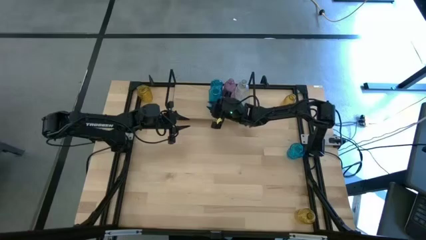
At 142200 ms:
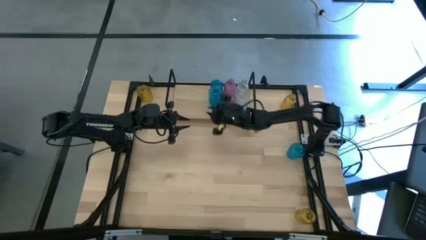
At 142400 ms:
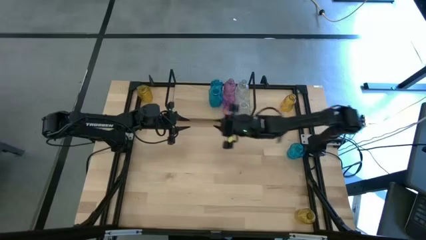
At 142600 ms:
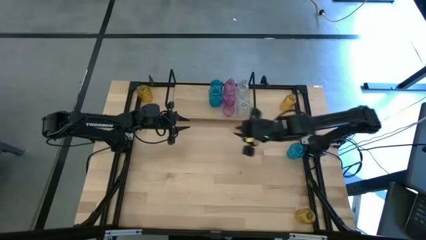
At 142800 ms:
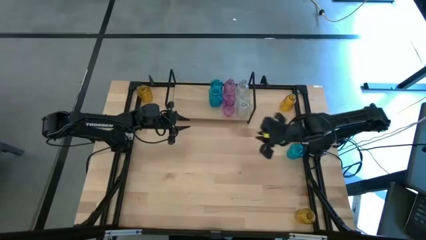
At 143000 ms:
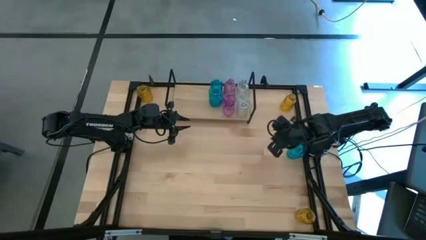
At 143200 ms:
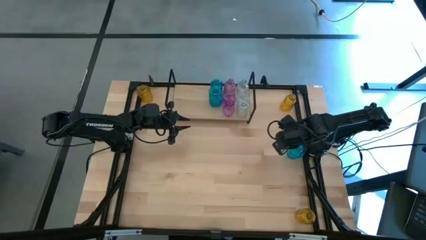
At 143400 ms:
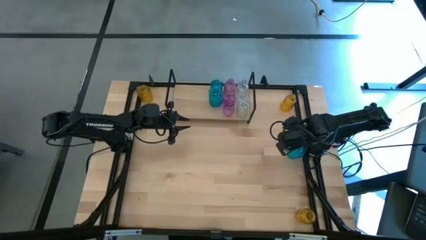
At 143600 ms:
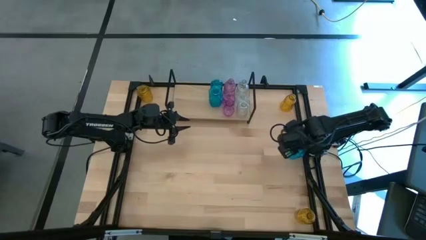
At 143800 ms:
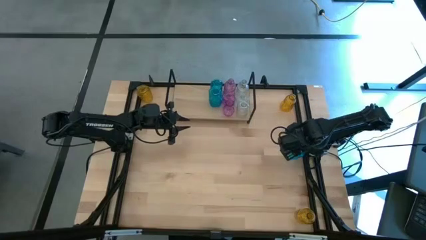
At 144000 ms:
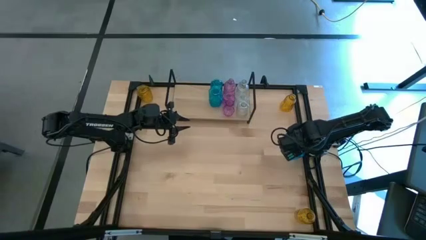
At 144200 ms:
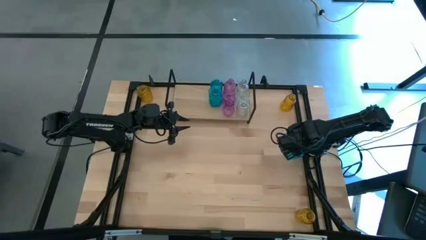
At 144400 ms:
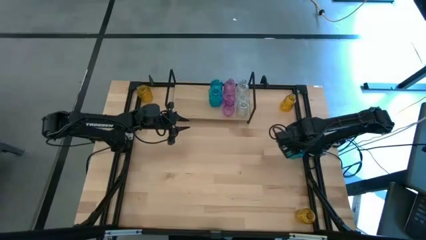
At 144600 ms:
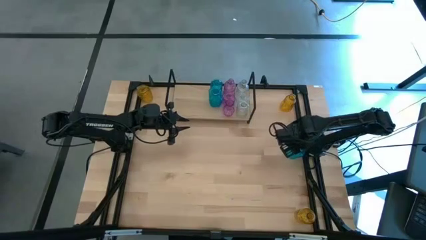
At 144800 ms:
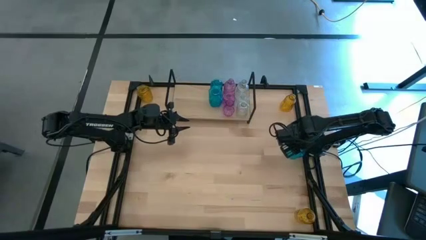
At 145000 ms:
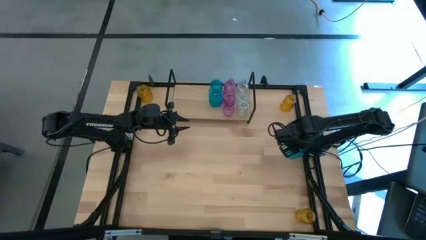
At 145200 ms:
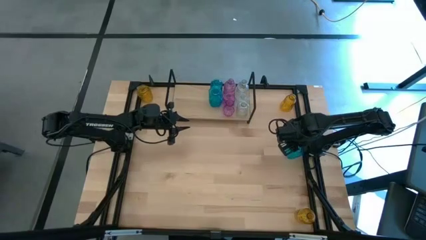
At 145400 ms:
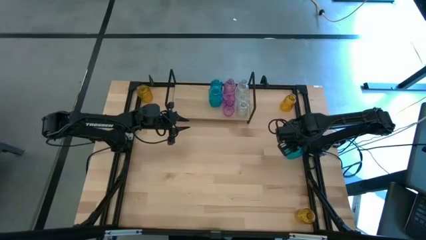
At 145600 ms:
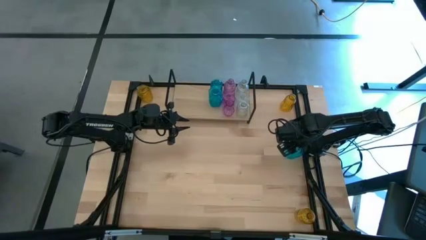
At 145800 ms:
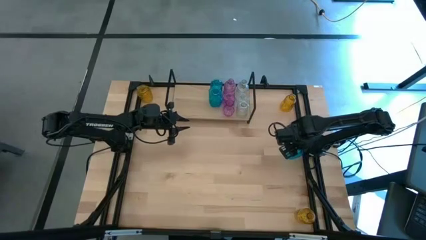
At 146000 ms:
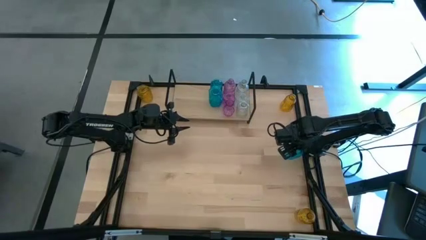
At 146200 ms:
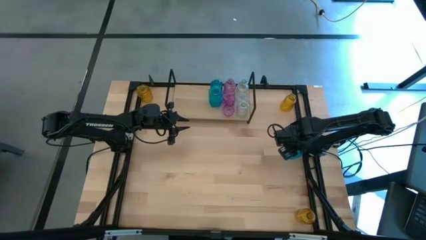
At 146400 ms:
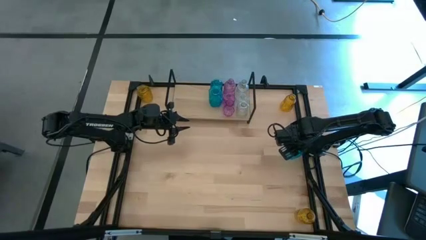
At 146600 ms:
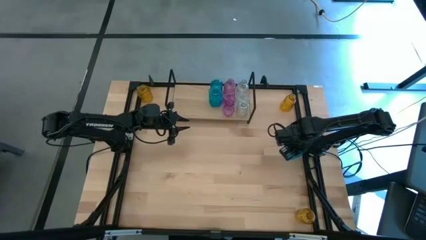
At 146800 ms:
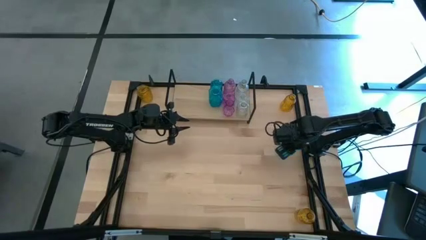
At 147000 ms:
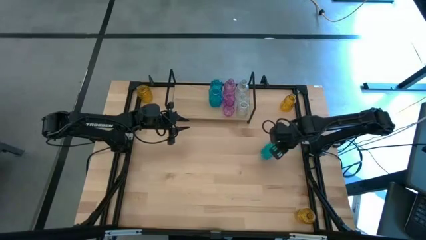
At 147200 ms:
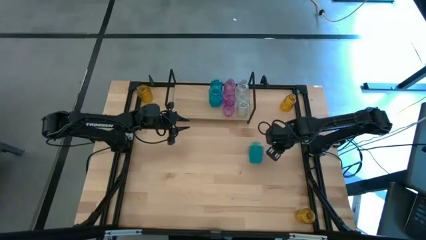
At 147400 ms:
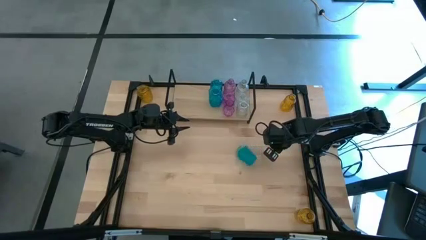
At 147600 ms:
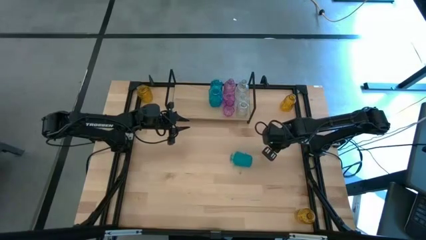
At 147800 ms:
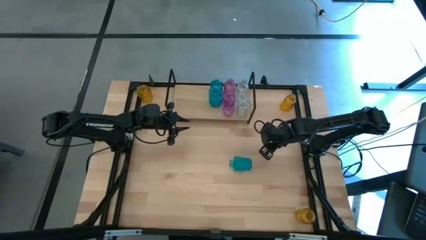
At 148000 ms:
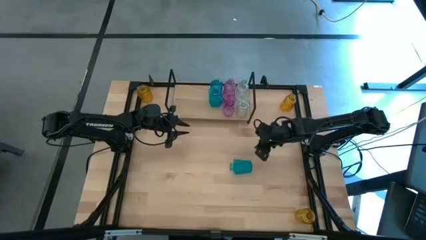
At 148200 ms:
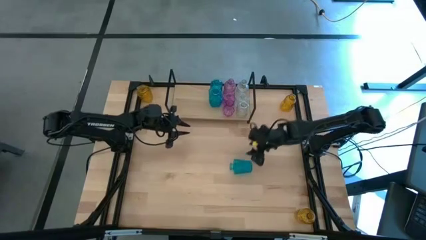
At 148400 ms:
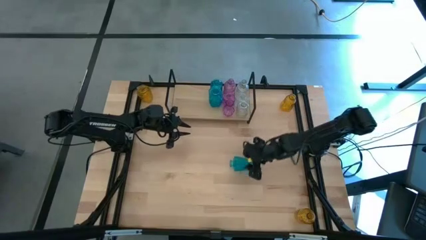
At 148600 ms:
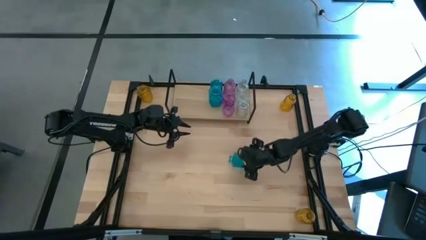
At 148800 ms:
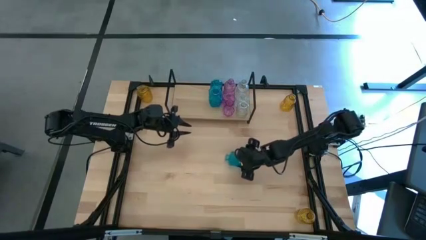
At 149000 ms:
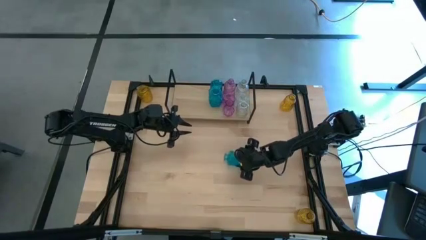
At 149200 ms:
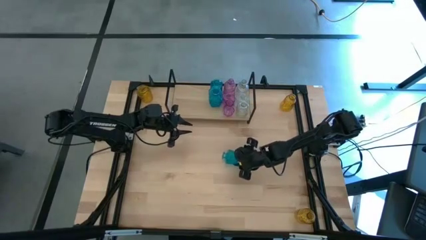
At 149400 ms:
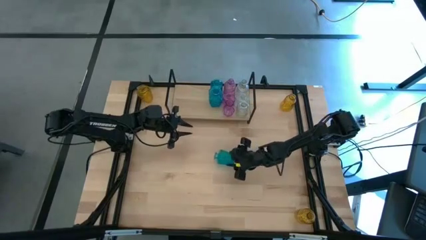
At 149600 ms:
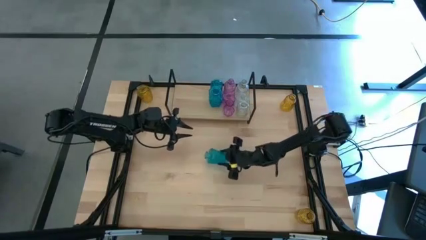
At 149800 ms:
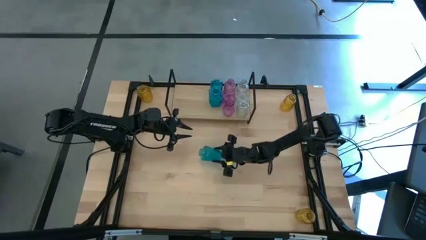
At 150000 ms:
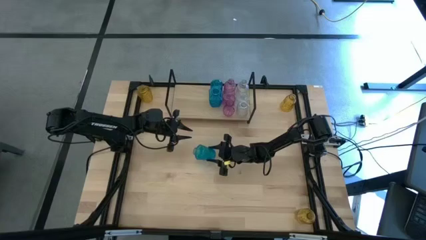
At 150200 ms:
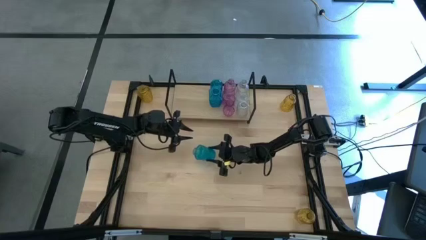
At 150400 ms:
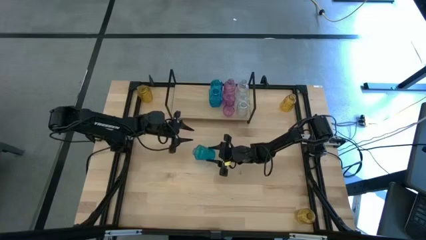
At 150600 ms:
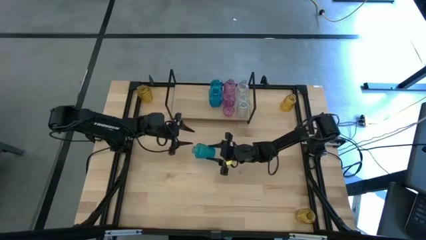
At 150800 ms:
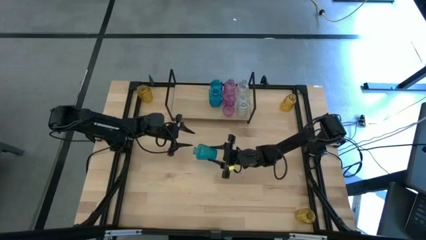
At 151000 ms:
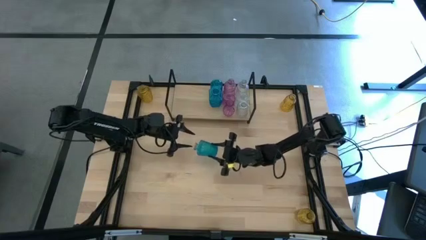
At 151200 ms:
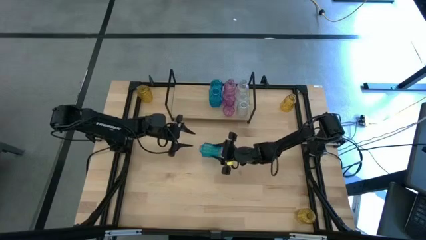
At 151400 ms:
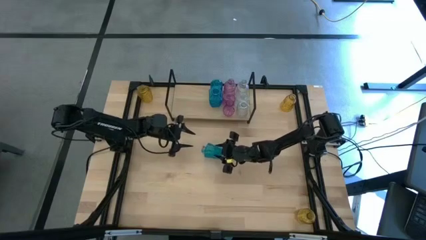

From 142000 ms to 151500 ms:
Task: sort vases onto shelf
Put the blue vase on the shelf aligned with the other blue vases
